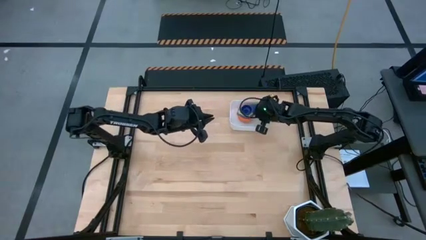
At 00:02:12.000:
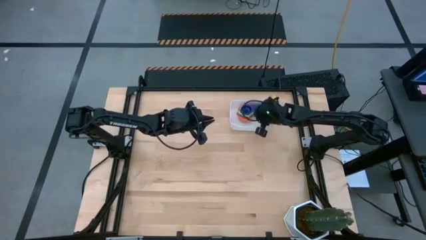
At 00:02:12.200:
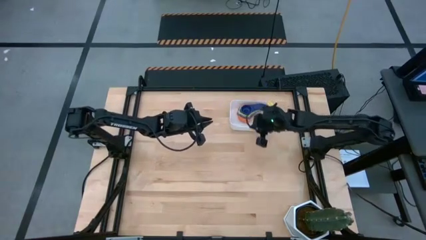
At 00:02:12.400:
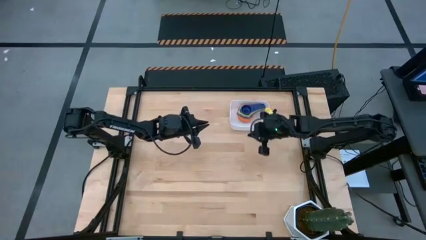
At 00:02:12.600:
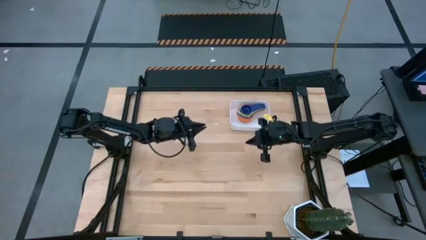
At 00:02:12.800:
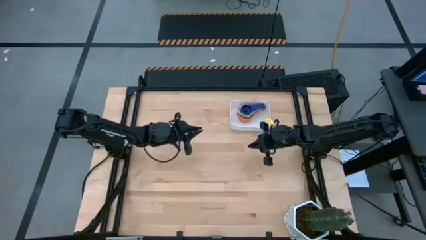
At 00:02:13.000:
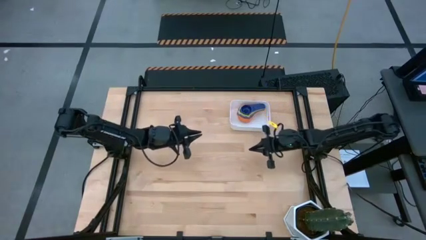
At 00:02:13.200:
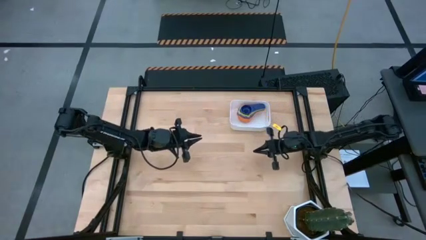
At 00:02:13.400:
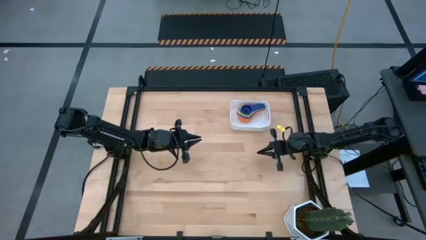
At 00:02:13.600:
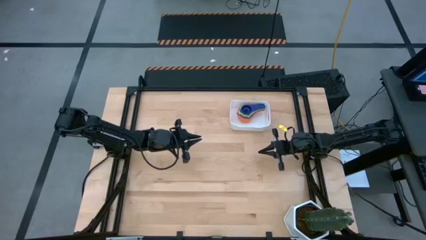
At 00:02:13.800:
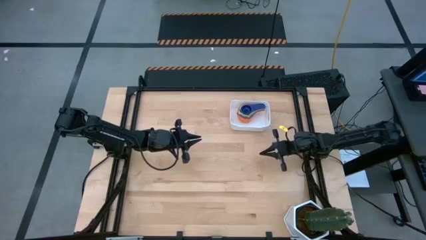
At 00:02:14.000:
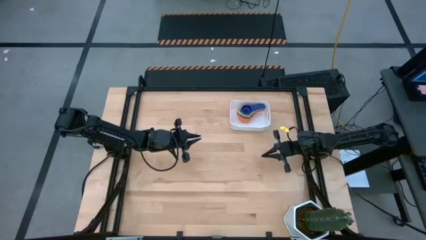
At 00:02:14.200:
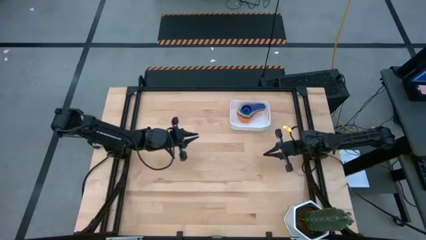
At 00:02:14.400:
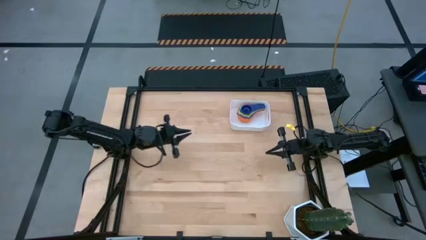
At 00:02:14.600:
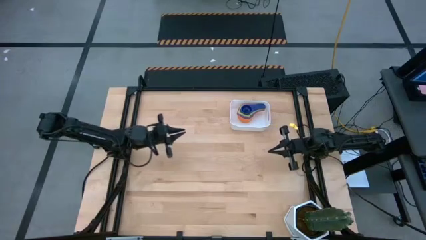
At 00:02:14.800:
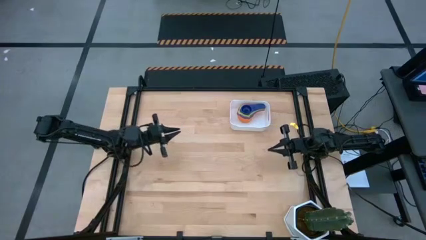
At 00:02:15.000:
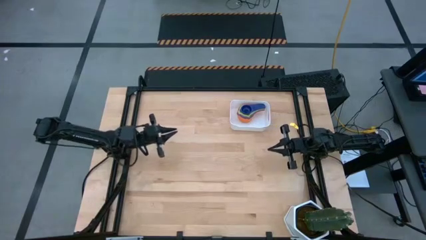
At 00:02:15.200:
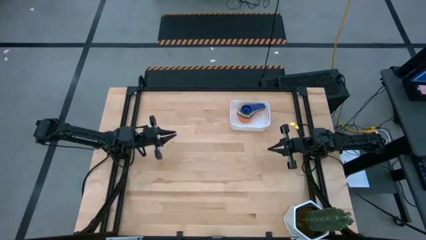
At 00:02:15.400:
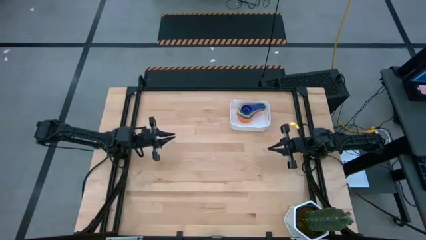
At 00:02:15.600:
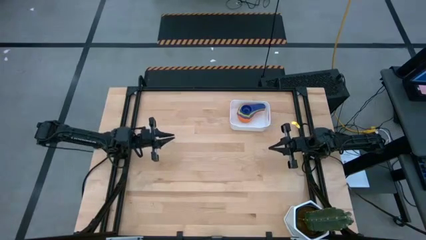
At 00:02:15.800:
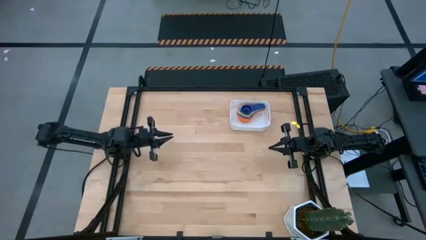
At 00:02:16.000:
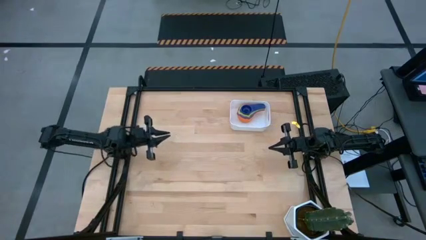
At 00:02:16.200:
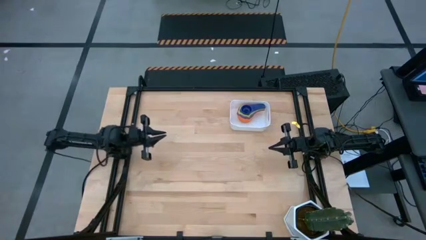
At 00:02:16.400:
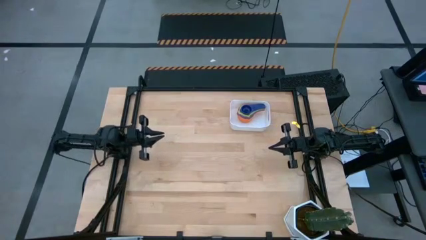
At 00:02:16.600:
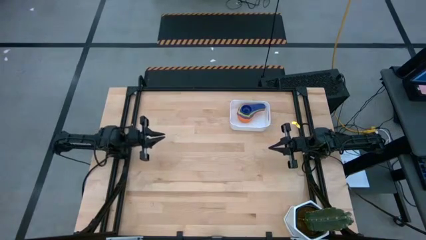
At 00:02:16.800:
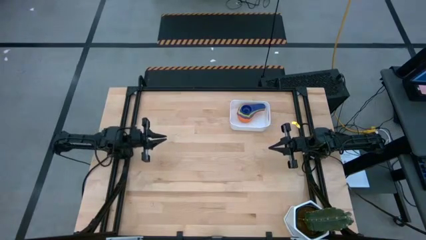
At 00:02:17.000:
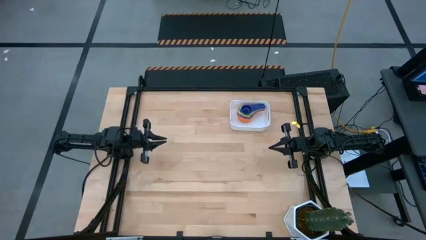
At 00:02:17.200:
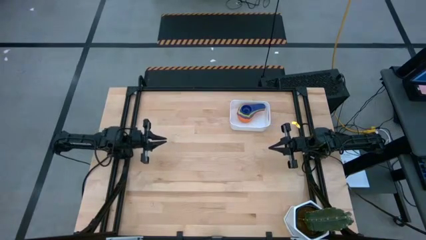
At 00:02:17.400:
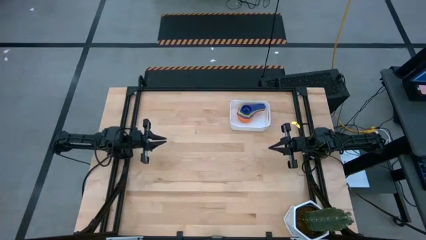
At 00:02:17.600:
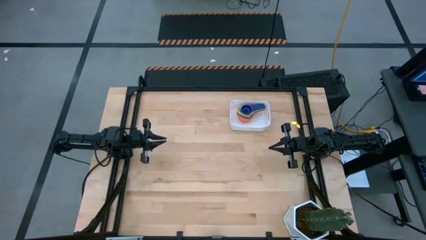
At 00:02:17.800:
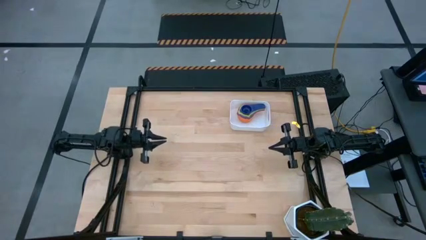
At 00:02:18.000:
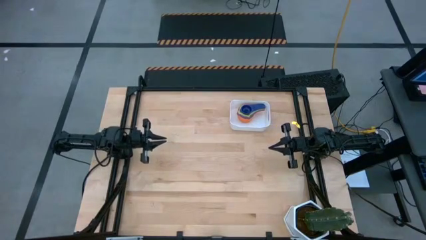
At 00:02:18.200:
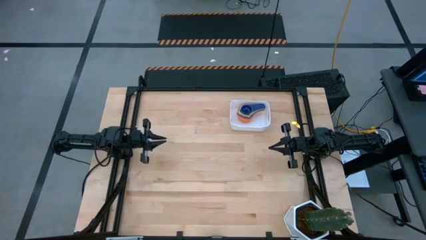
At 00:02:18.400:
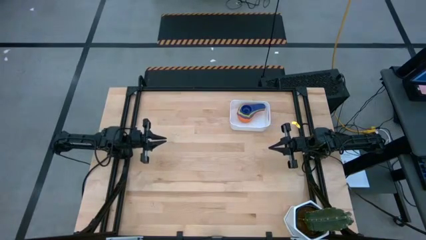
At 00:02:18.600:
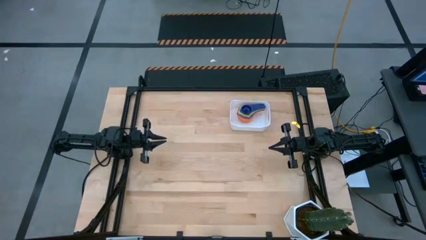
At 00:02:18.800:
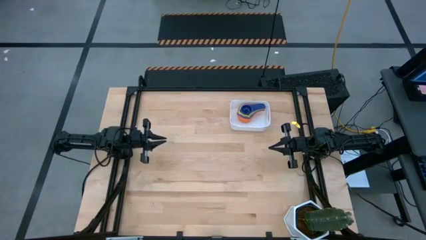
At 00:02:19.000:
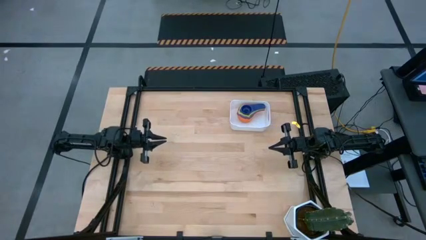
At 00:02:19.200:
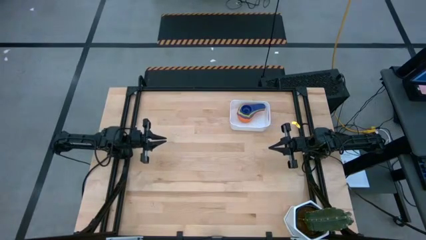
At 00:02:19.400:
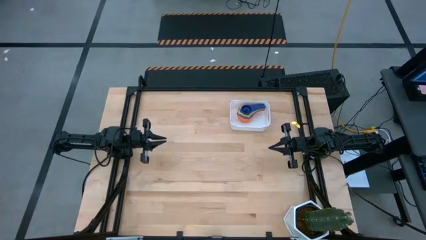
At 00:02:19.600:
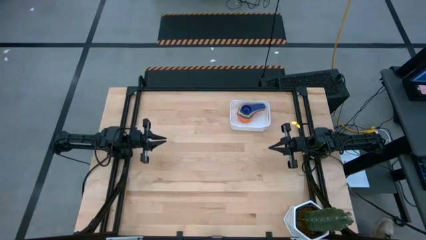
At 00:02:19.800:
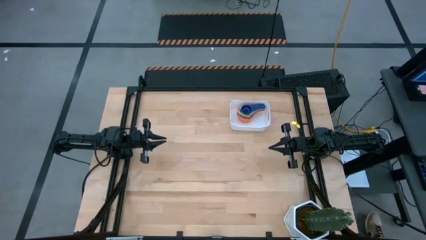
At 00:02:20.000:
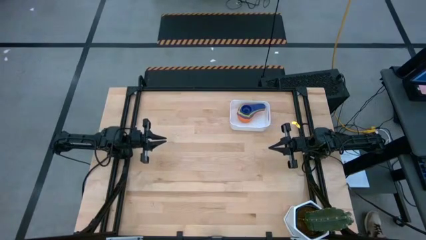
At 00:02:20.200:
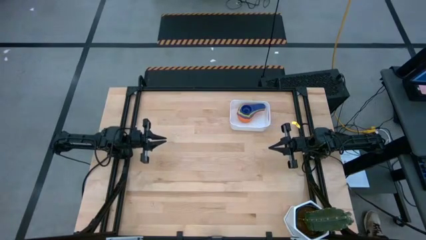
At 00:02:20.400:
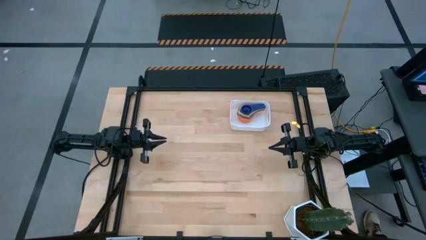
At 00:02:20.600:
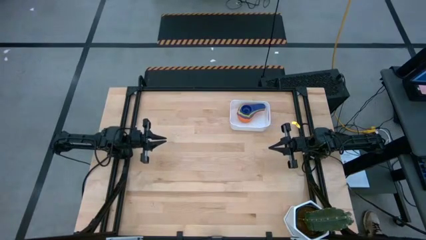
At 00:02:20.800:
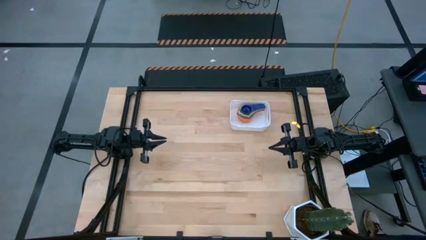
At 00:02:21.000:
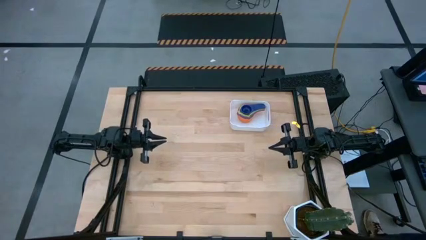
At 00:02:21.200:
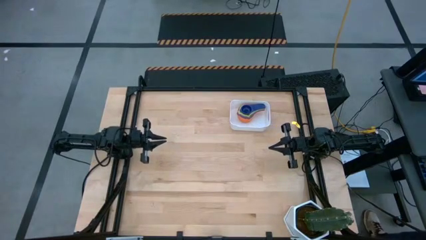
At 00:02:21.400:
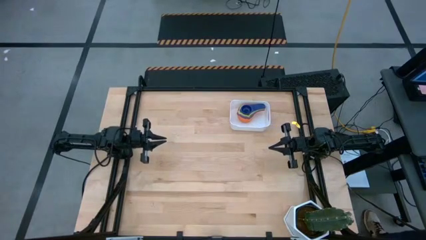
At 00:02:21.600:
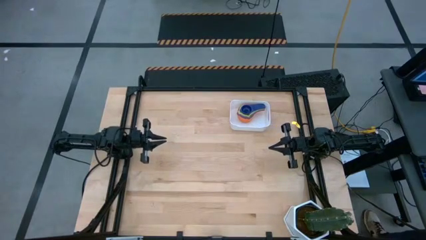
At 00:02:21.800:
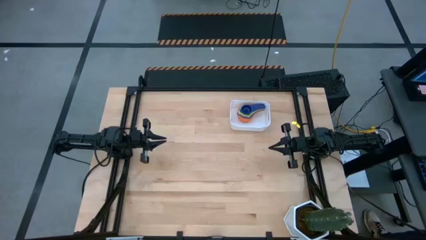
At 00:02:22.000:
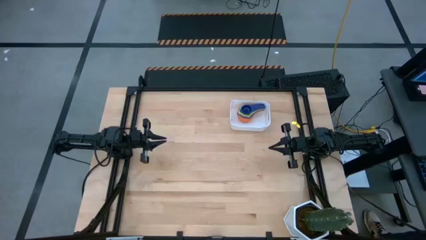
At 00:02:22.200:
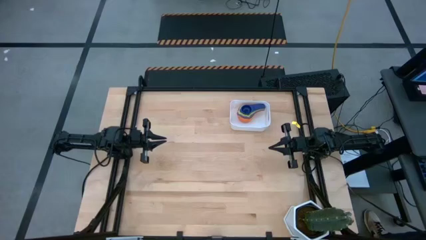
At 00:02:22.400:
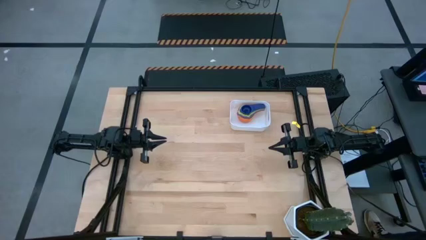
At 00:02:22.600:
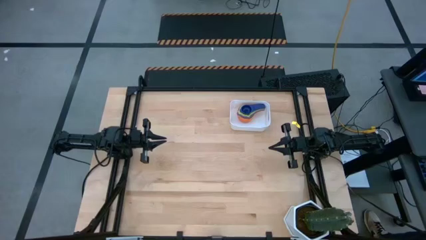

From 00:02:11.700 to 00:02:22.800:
Task: Nest measuring cups in basket
Return to Home Position
